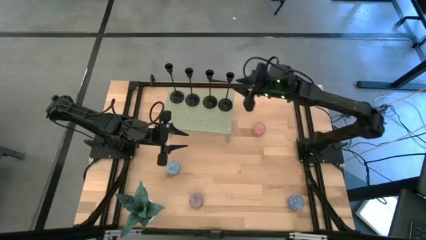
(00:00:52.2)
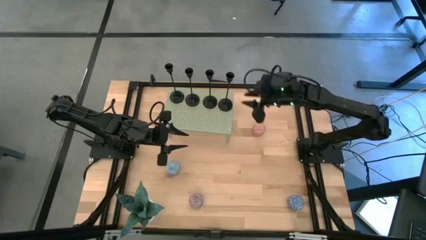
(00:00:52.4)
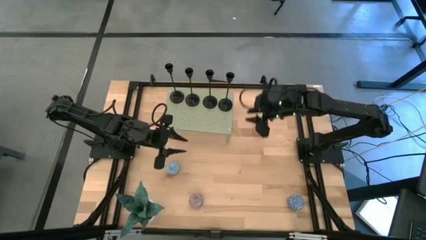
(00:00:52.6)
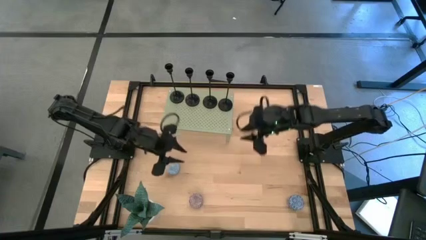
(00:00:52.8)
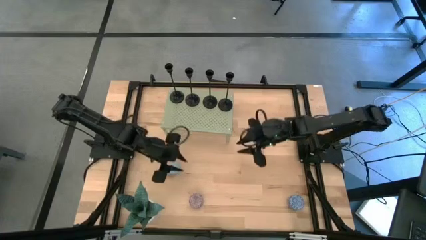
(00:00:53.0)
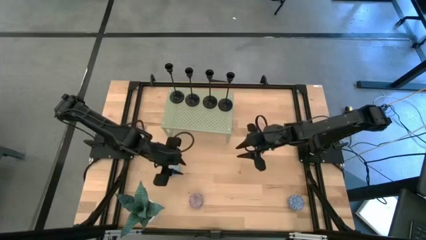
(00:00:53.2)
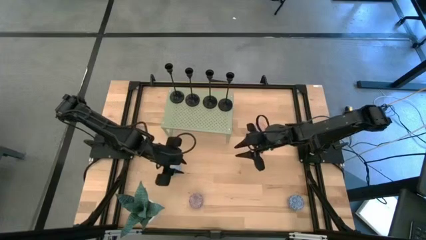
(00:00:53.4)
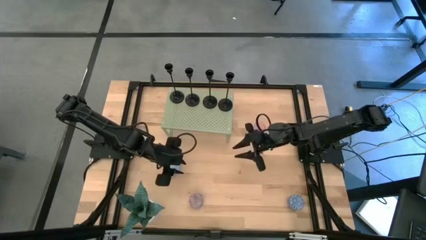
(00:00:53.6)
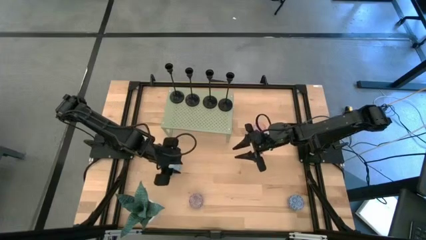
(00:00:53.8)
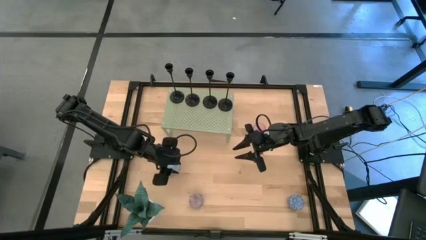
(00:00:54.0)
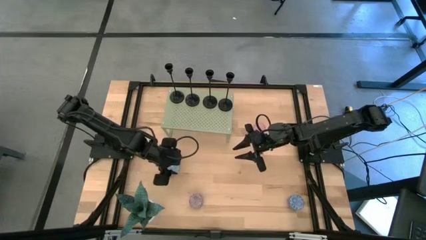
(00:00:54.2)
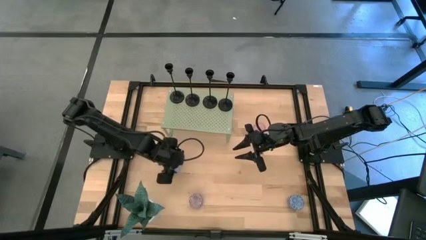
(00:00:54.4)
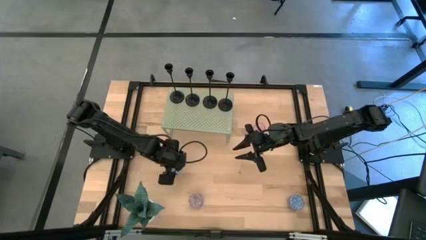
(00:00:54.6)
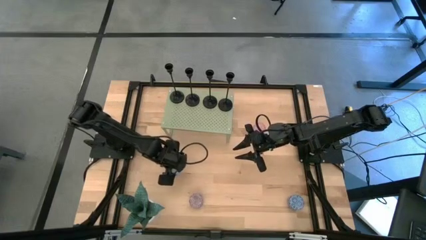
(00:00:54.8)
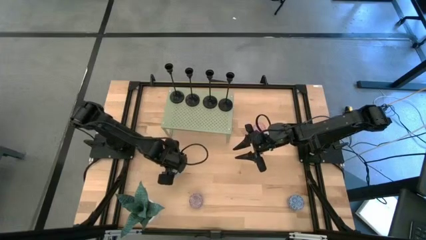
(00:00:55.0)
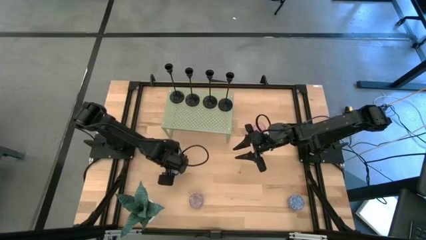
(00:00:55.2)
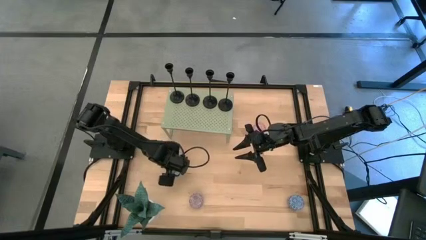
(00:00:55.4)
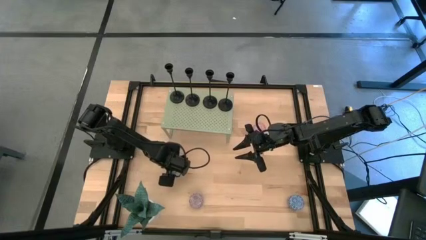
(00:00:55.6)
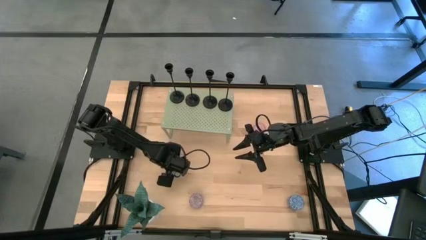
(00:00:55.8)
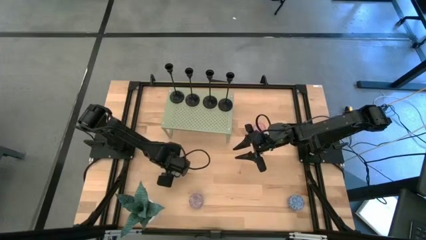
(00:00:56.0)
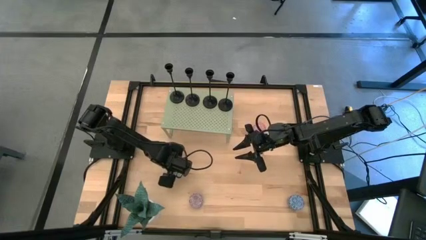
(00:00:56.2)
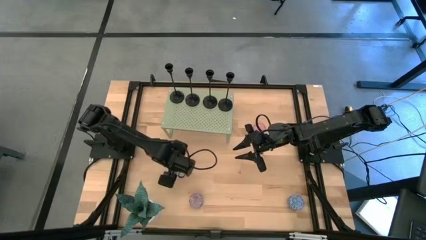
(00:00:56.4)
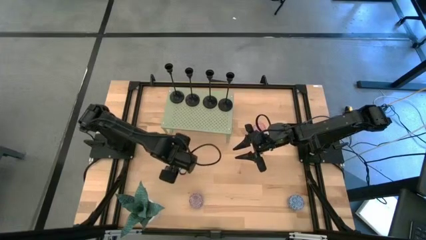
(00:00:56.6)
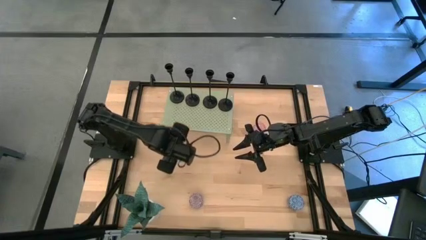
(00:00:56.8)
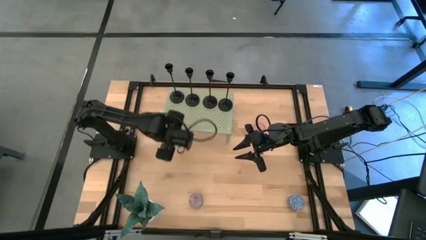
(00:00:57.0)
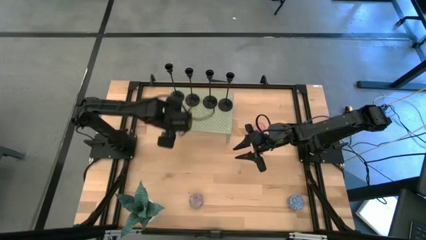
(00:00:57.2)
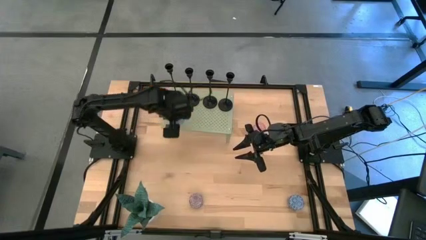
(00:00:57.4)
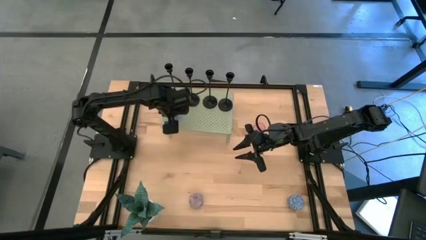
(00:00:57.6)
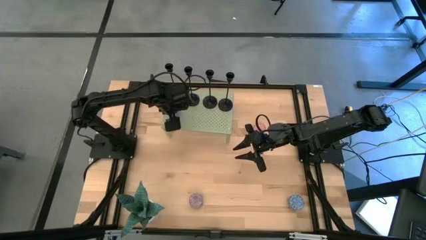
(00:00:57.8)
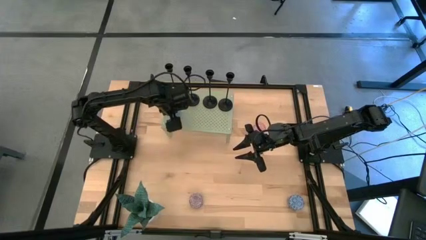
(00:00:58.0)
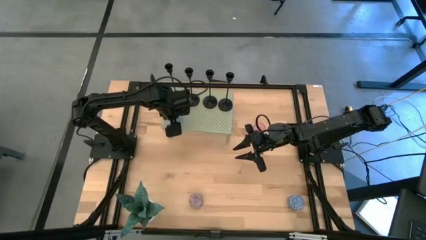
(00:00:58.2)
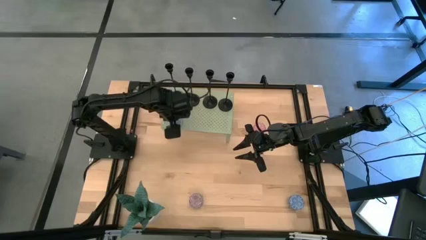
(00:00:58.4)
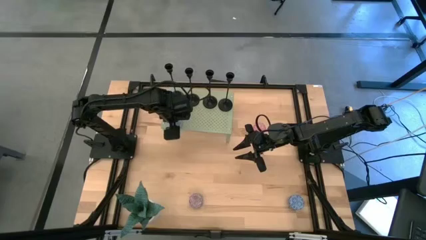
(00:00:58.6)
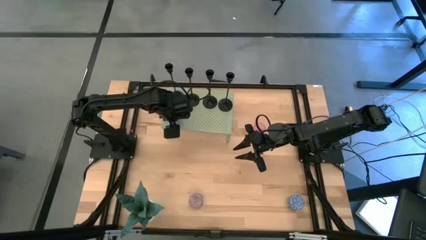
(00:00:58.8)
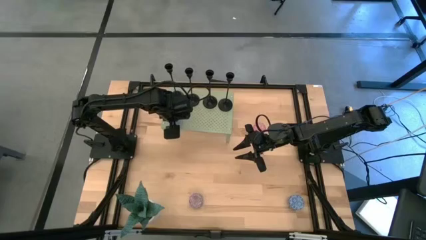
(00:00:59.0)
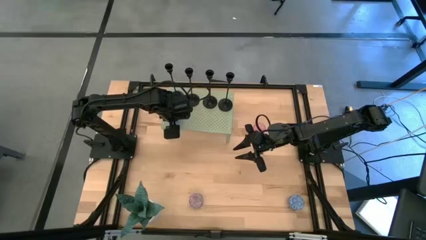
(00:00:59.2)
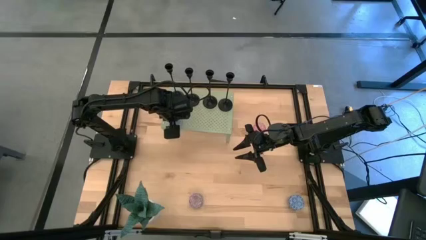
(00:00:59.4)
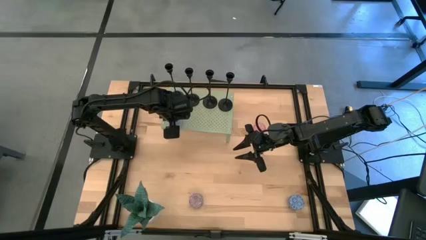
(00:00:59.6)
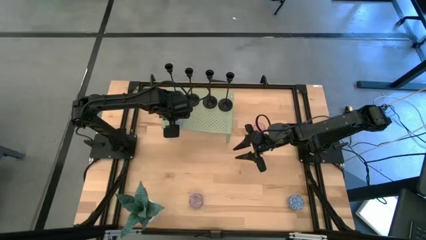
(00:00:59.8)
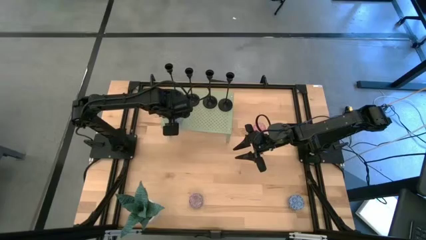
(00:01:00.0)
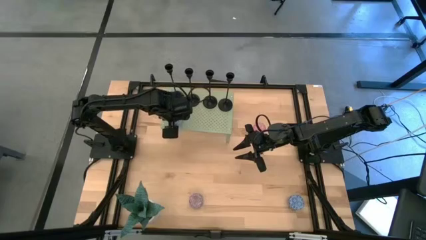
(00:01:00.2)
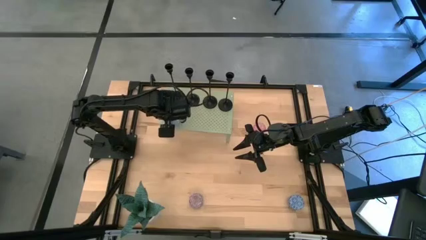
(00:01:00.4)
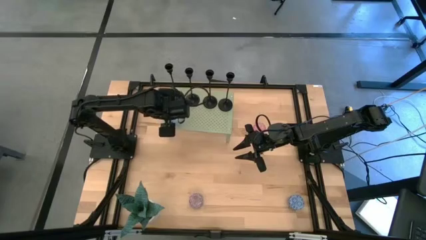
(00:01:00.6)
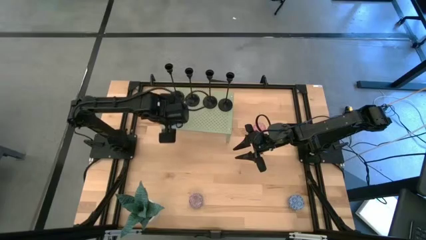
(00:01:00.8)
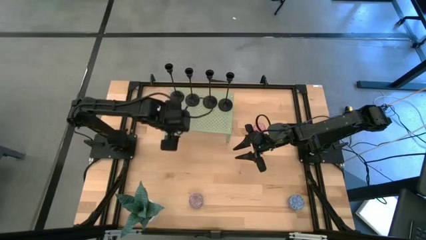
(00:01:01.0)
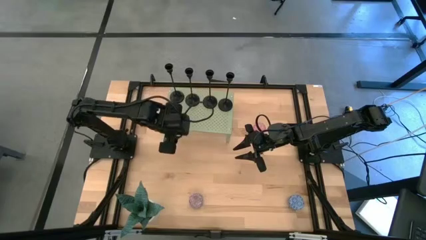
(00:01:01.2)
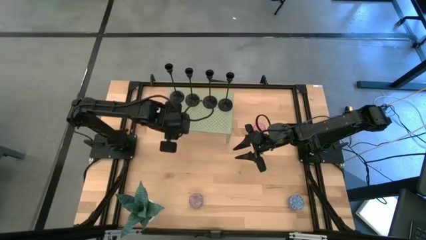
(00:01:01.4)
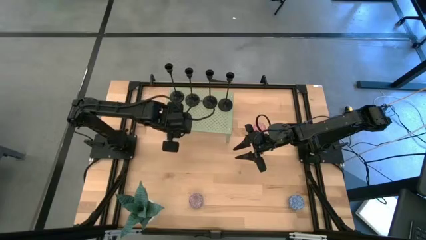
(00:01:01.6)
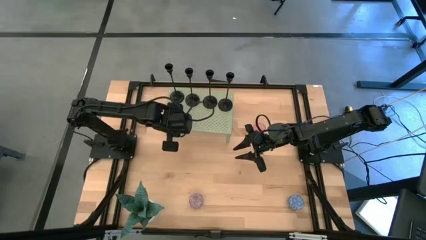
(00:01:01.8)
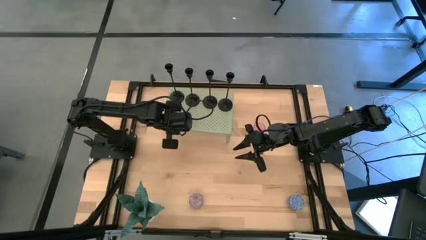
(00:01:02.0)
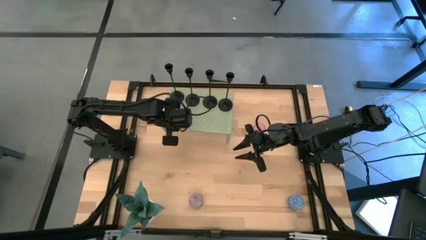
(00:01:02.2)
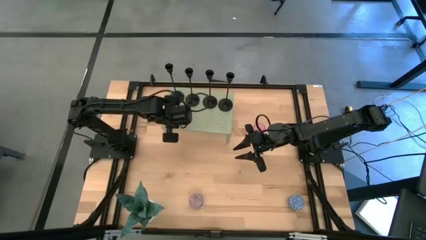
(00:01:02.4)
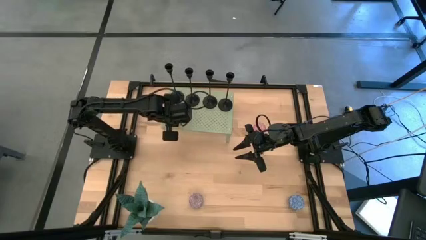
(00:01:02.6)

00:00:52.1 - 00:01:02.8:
Task: Pick & Place candle stick holders
Put the light blue candle on the shelf

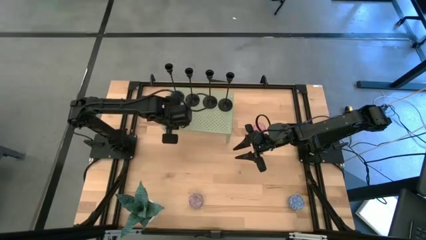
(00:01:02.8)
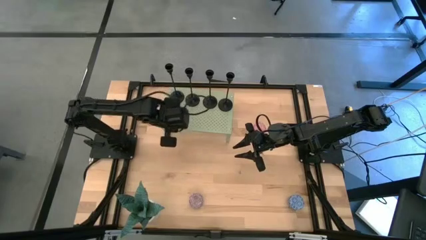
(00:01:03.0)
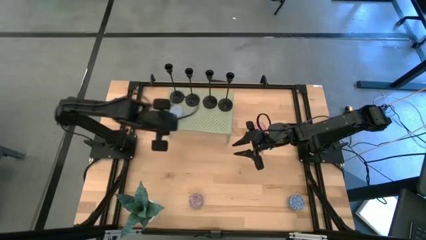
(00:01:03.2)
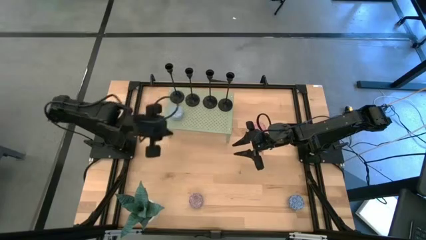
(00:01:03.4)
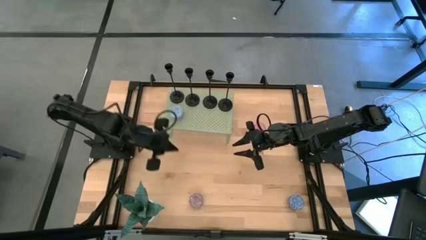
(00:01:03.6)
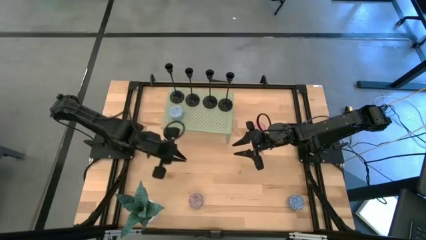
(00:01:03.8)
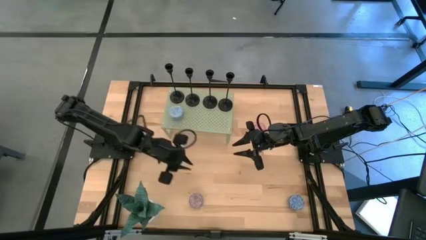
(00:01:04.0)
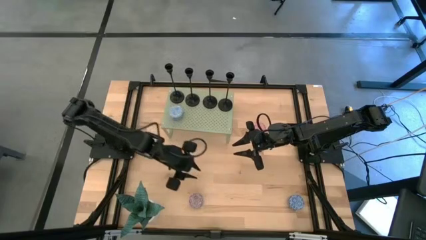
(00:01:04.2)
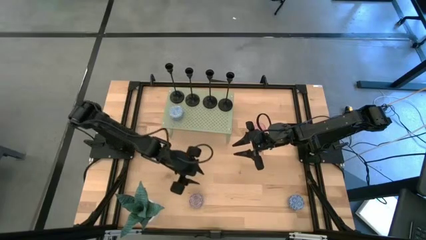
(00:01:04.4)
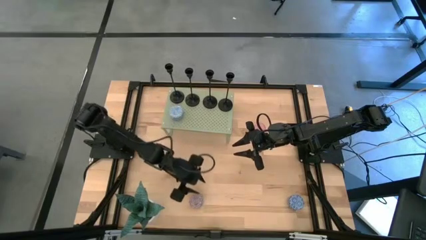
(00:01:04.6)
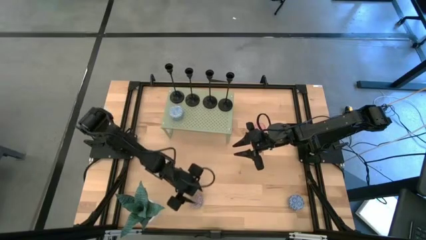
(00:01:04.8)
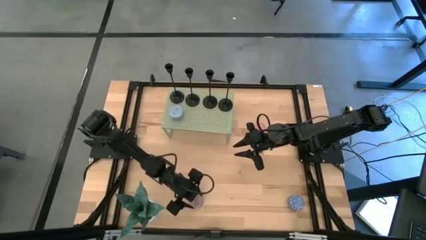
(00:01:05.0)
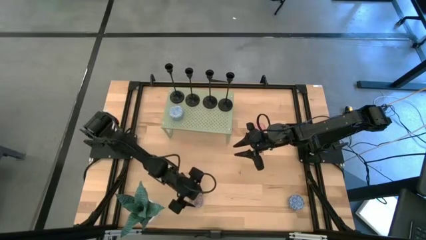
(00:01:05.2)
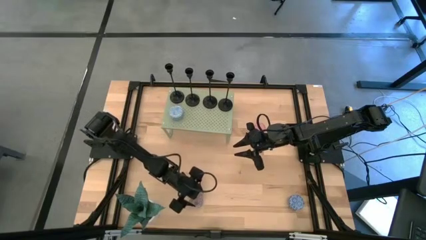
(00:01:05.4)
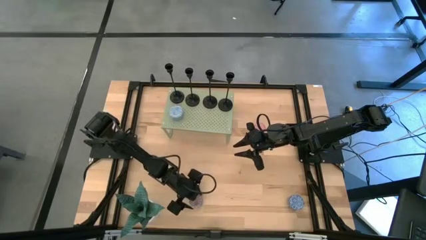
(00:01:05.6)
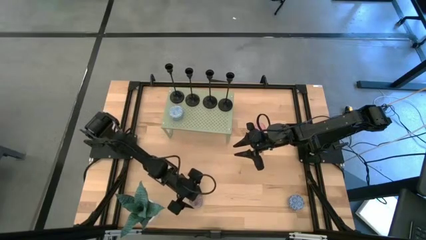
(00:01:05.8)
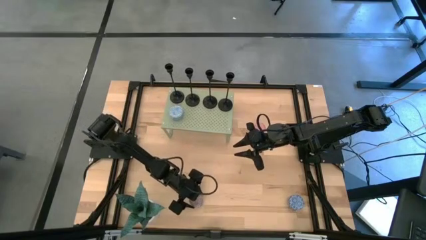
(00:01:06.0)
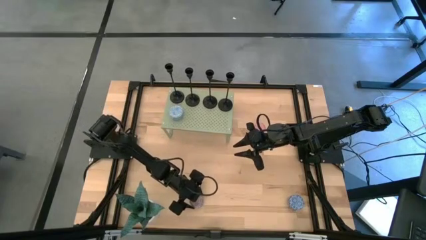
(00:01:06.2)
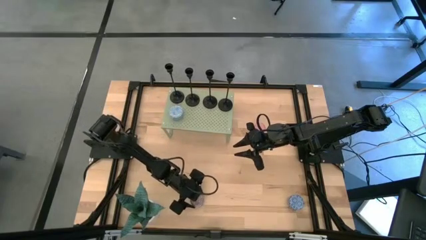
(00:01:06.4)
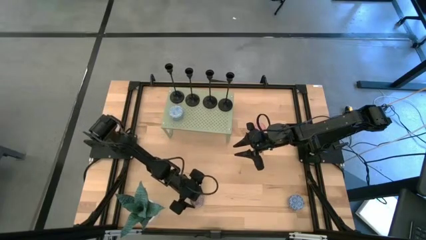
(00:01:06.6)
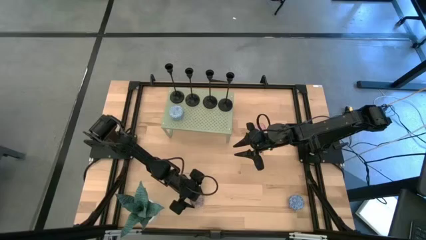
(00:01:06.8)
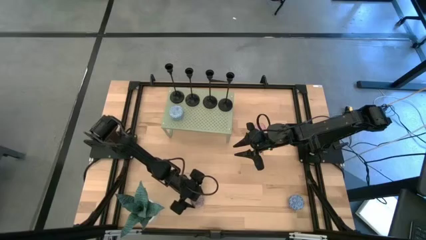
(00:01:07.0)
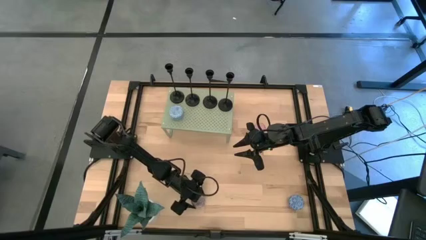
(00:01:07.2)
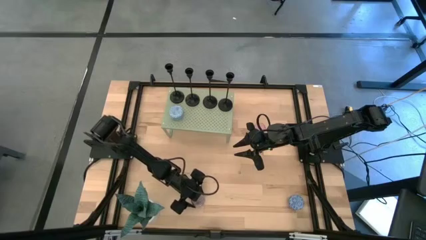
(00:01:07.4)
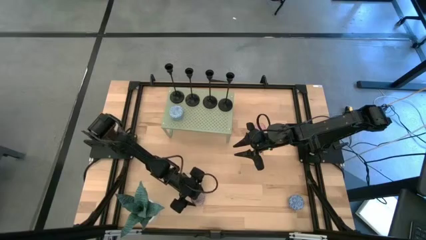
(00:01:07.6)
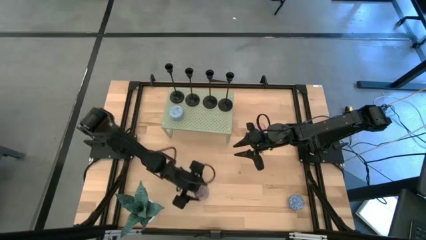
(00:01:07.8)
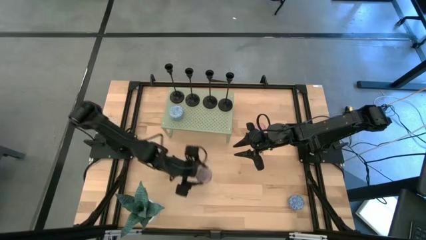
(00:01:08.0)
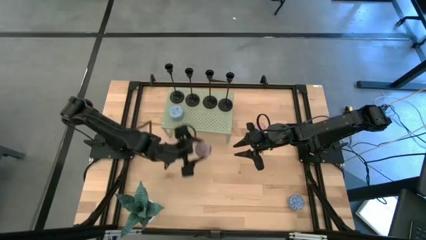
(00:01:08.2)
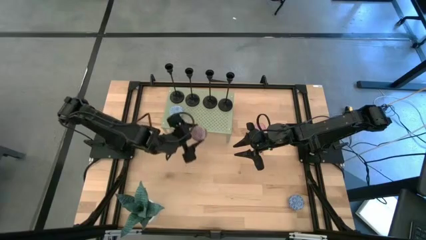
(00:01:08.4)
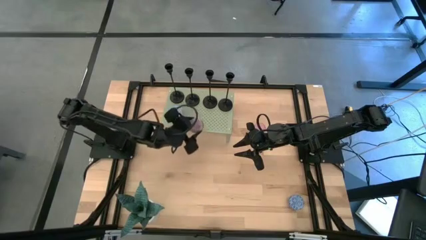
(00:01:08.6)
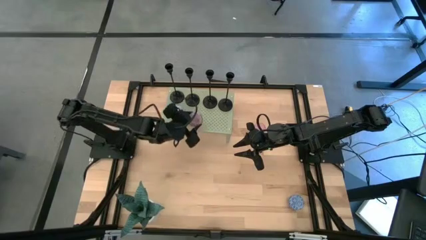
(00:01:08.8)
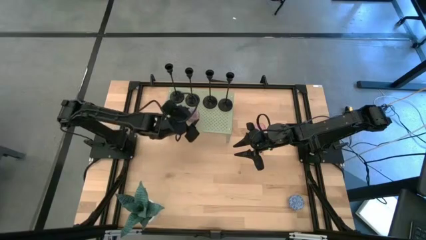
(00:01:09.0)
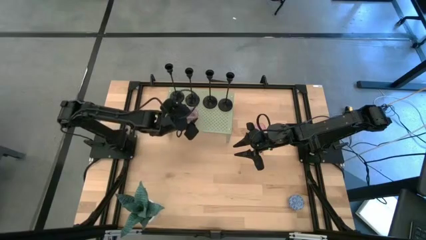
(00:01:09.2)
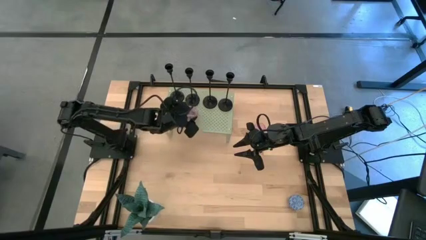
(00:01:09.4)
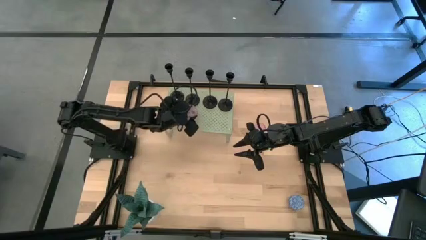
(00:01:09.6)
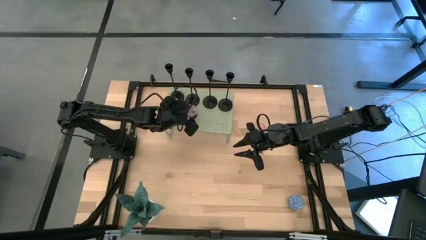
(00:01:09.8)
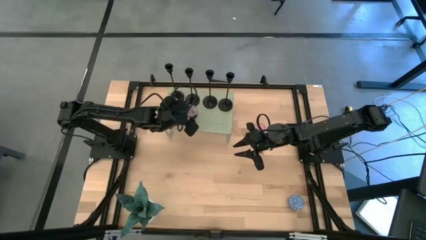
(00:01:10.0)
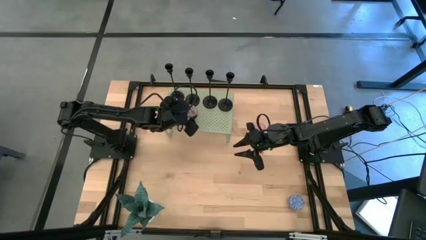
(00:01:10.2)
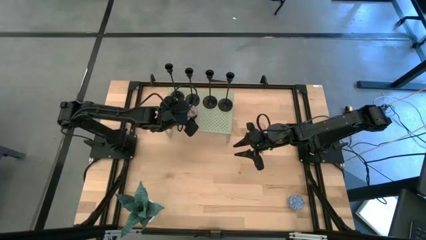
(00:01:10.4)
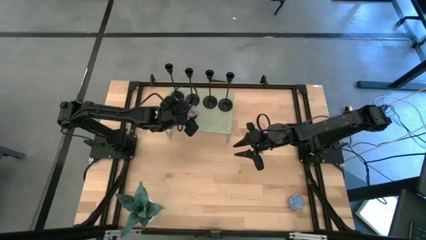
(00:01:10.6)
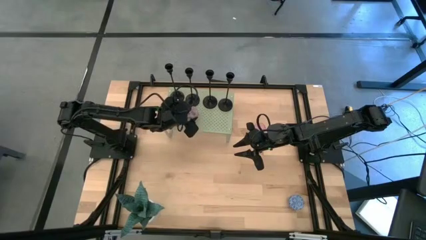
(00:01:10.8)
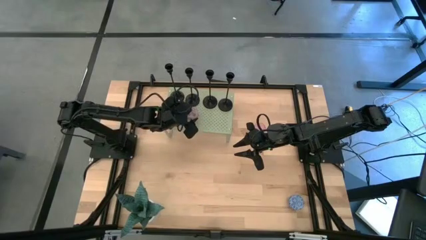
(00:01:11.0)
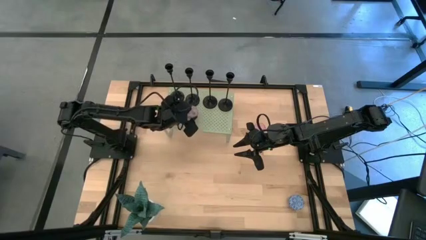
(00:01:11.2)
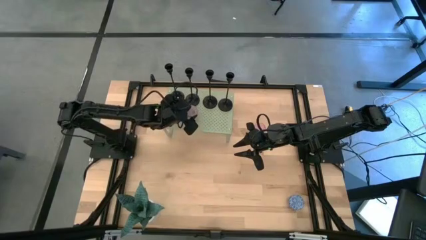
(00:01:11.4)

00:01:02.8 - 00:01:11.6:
Put the dark red candle on the shelf aligned with the other candle
